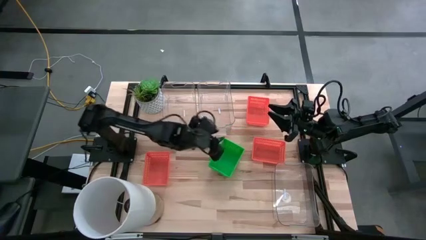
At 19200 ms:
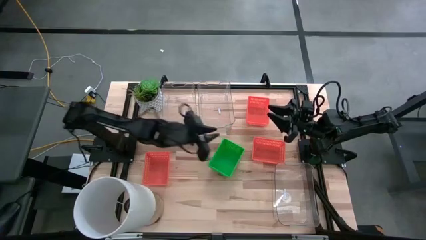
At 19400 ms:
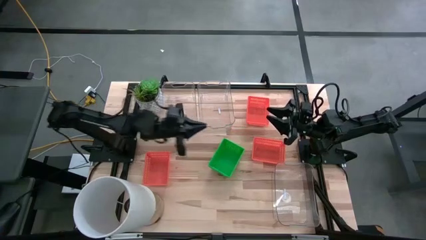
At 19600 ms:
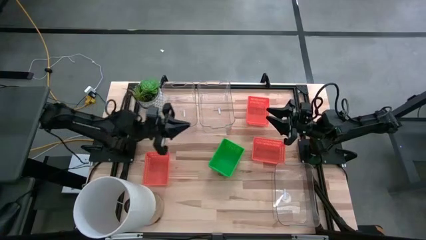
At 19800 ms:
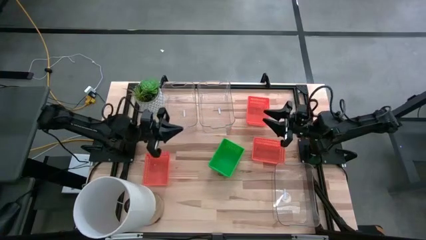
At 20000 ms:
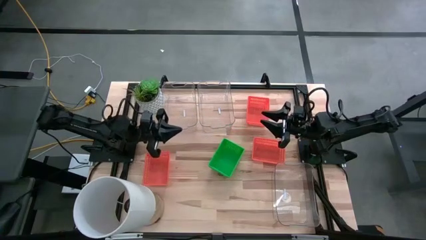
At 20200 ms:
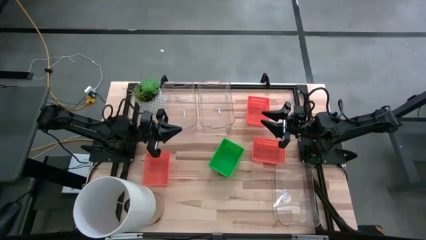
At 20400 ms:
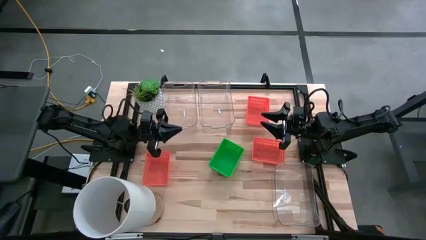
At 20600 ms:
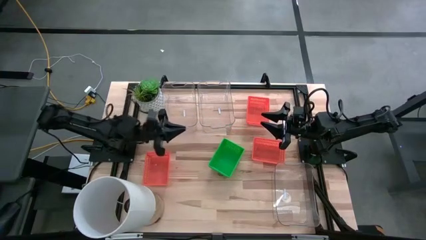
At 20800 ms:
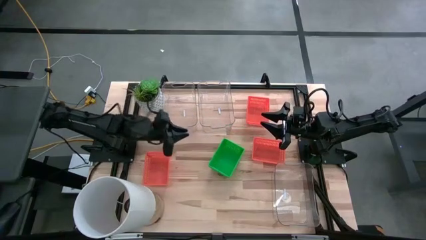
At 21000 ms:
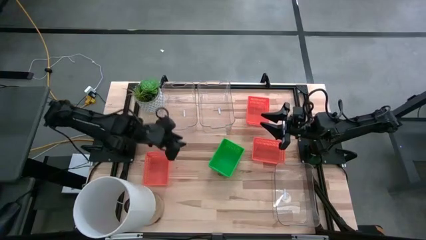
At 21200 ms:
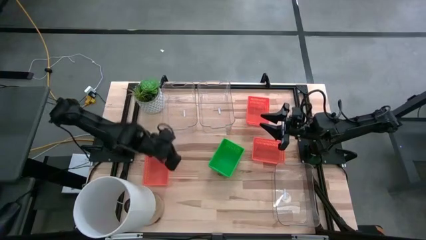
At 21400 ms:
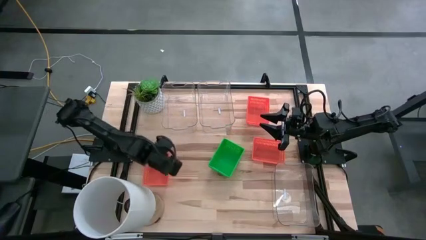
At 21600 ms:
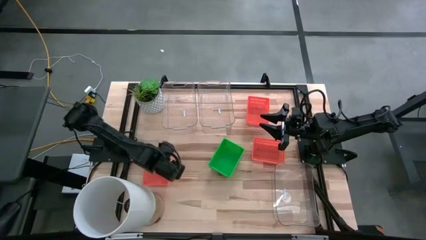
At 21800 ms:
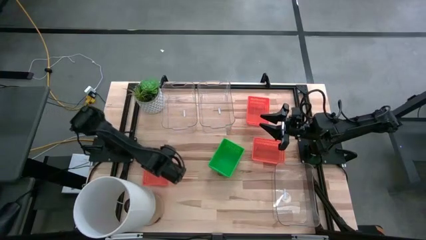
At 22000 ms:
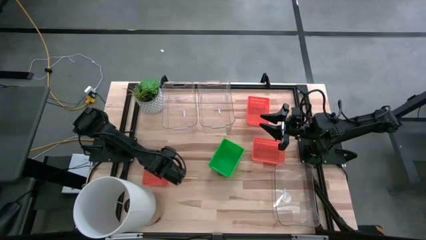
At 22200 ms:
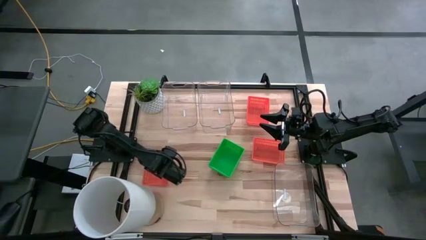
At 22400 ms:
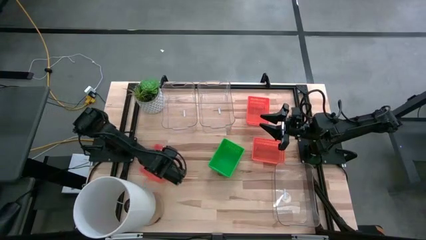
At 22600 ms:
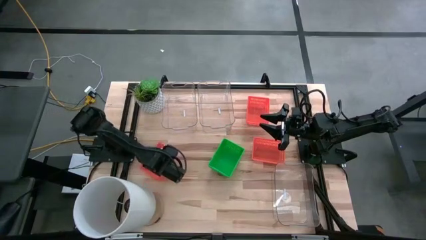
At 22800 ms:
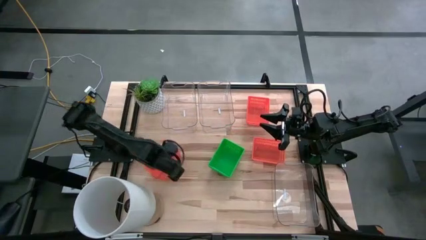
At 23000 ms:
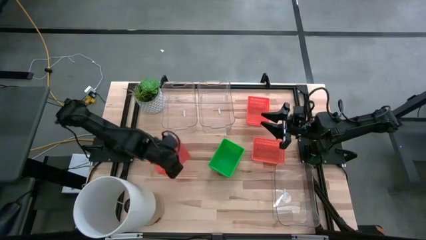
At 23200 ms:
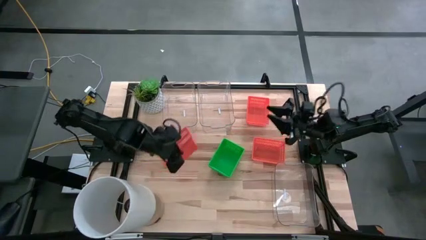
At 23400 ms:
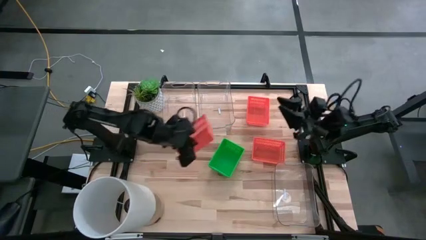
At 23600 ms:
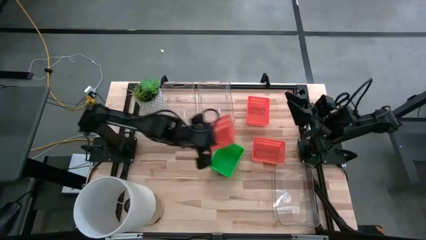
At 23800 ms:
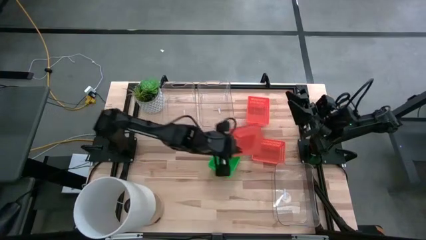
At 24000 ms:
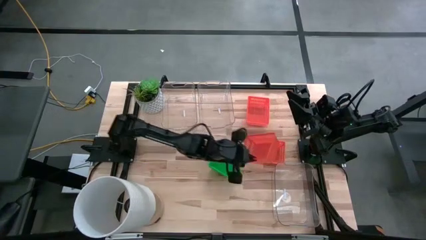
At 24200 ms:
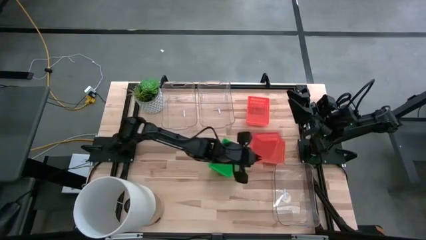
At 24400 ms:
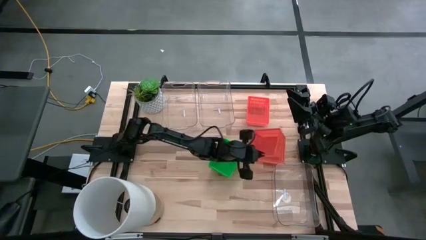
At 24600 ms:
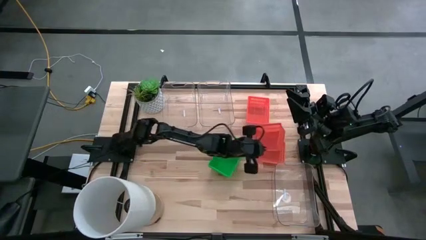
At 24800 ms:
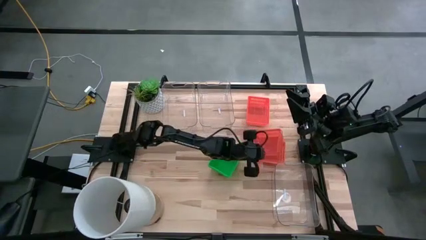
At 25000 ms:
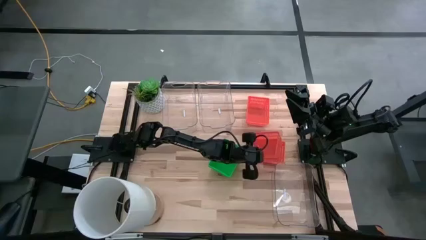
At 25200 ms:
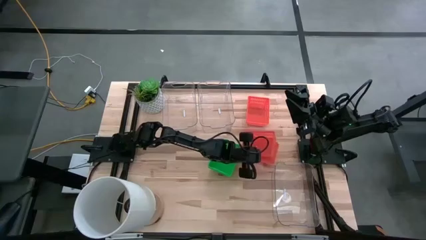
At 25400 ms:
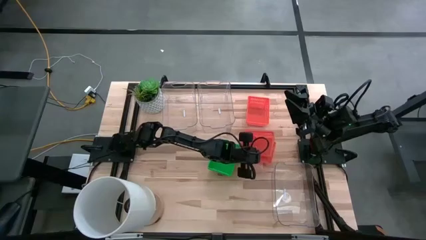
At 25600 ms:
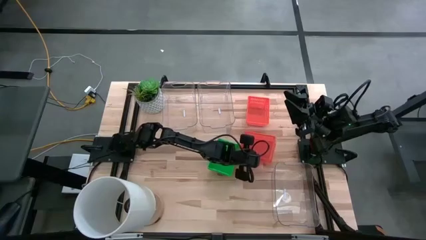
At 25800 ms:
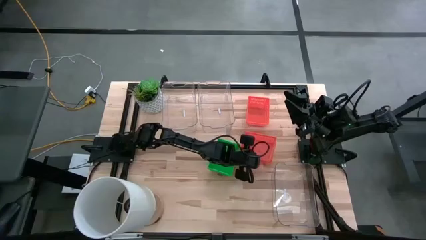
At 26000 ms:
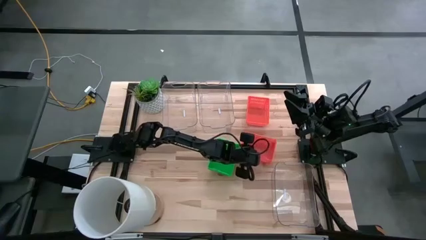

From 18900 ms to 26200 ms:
Stack the bottom left orange bin on the bottom right orange bin

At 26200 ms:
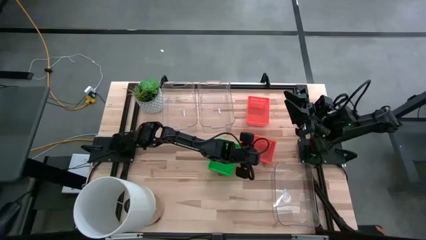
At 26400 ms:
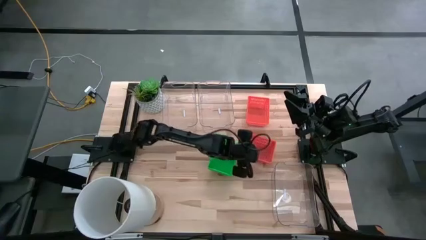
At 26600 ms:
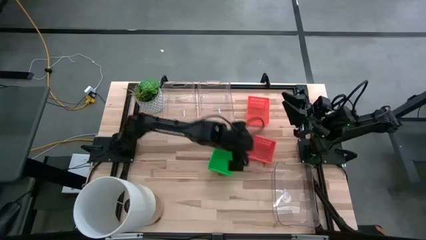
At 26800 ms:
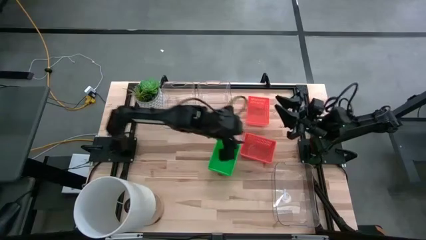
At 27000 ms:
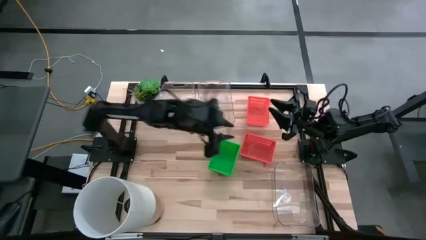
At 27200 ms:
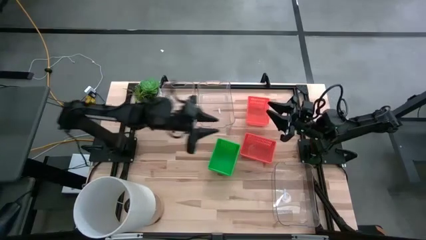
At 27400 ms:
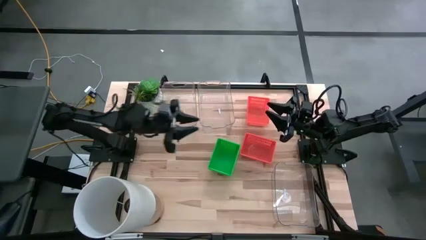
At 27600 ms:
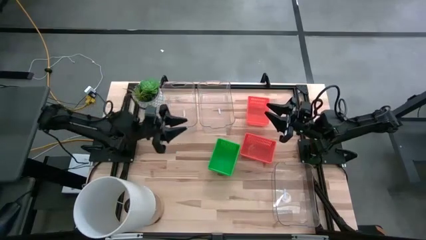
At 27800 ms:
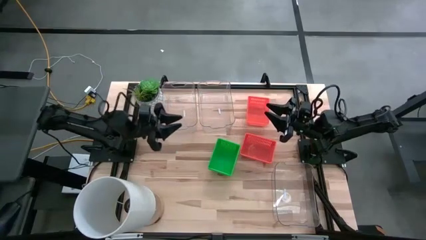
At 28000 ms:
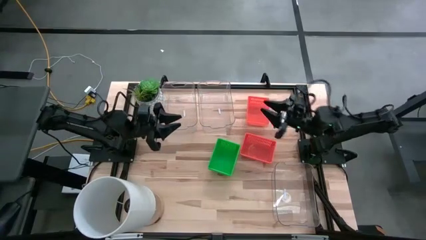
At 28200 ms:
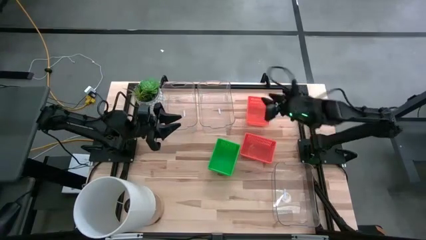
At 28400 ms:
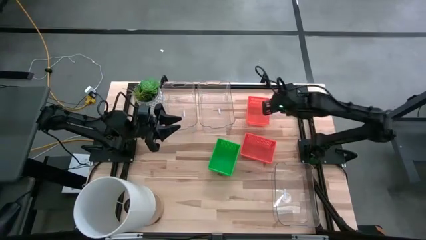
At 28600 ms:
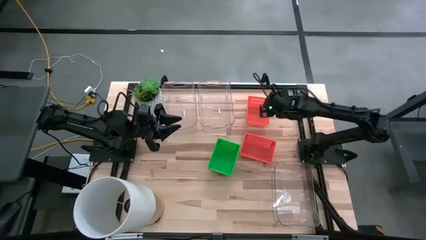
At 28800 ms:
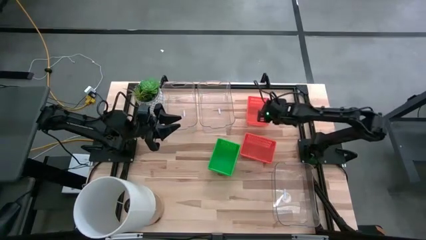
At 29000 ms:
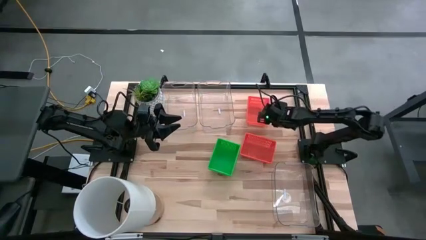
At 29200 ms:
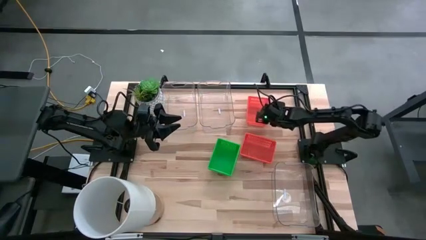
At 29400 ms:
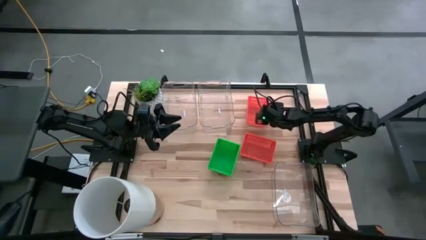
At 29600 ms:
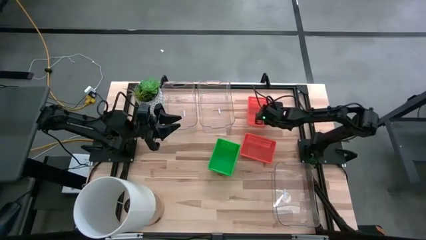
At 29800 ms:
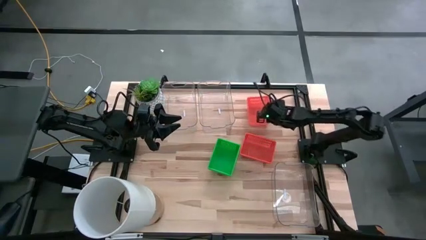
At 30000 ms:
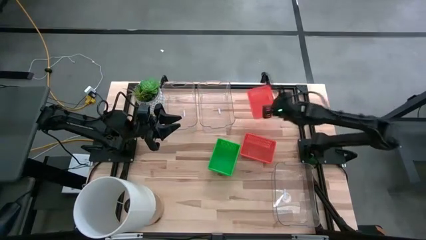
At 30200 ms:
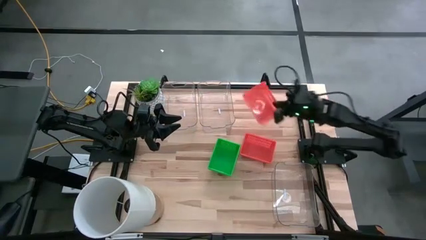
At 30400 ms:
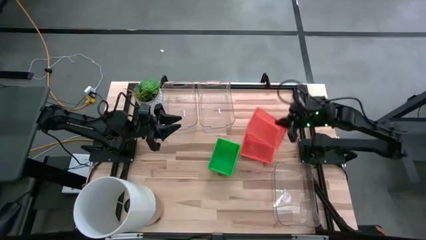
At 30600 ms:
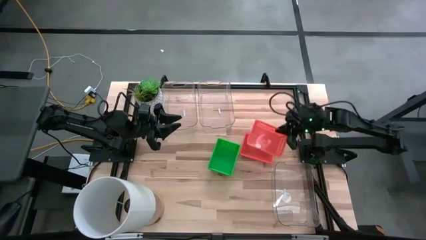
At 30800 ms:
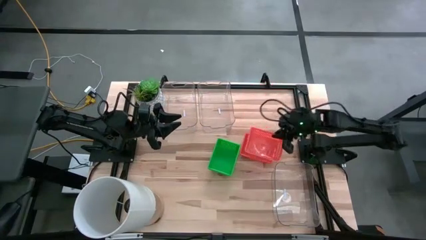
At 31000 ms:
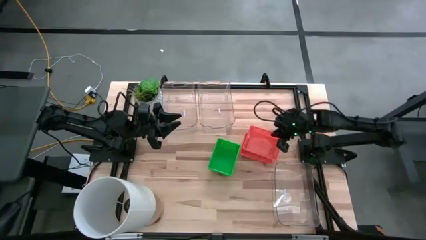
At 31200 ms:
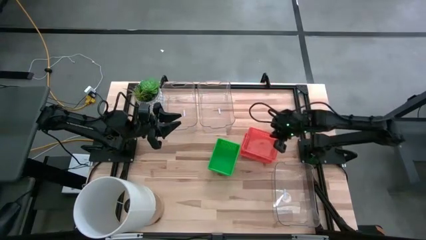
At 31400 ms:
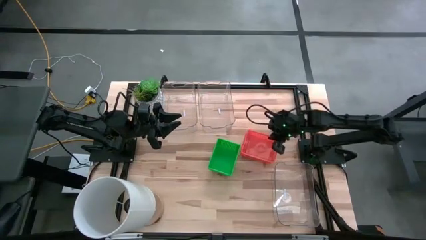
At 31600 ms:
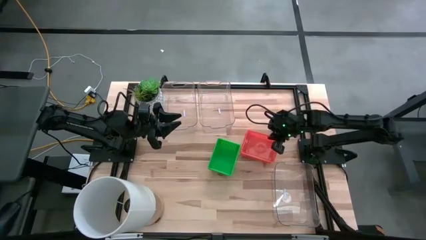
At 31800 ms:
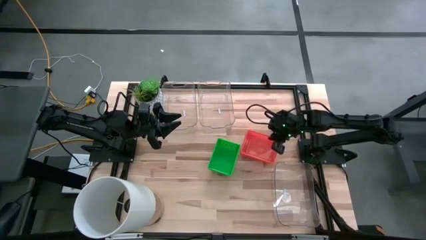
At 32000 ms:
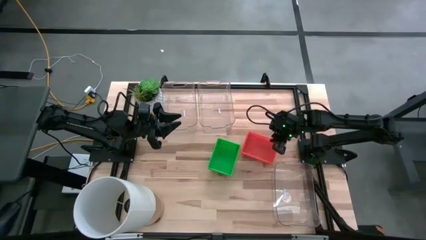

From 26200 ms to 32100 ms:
Stack the top orange bin on the bottom orange bin

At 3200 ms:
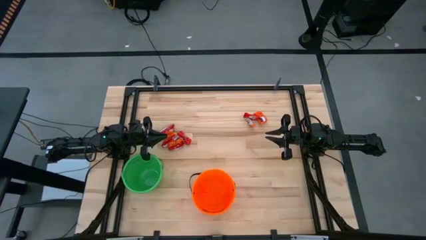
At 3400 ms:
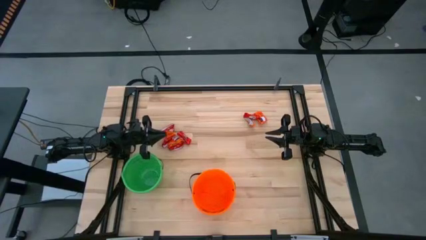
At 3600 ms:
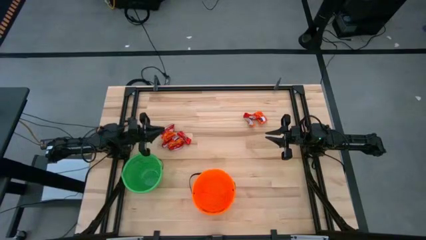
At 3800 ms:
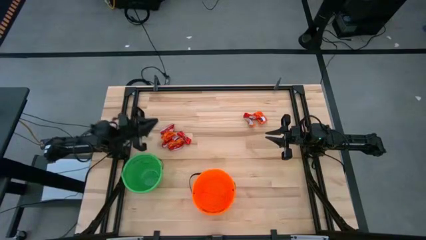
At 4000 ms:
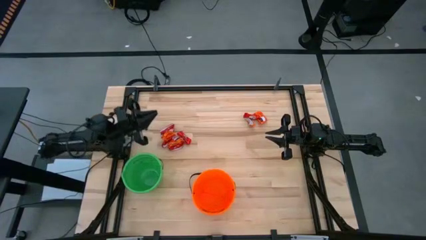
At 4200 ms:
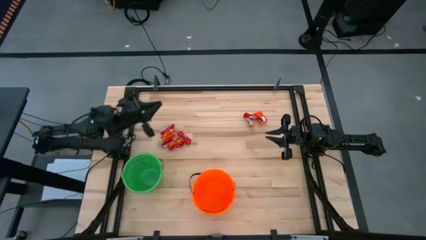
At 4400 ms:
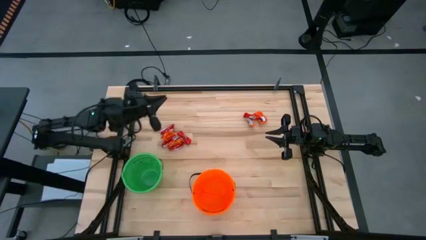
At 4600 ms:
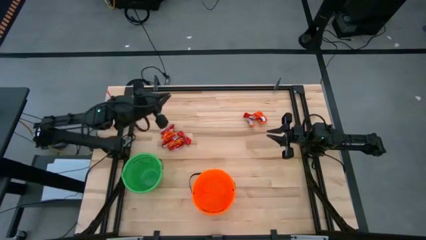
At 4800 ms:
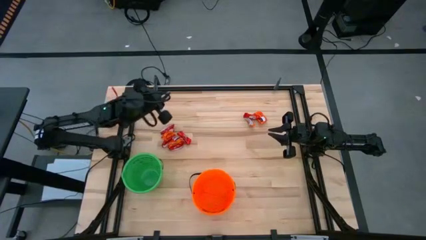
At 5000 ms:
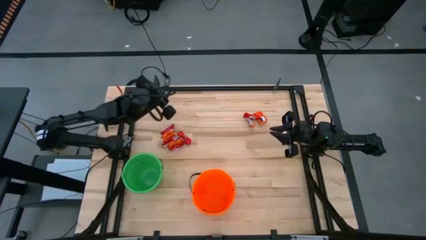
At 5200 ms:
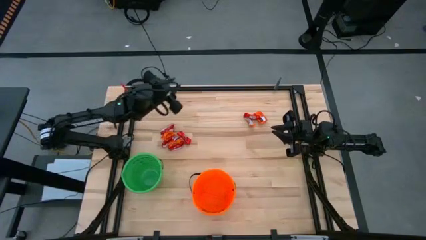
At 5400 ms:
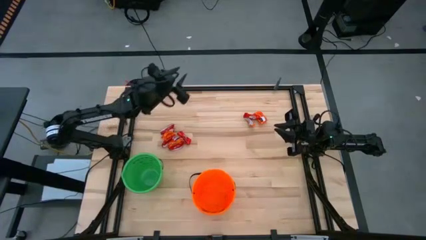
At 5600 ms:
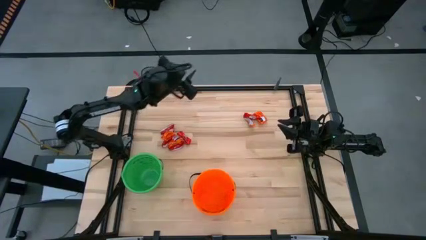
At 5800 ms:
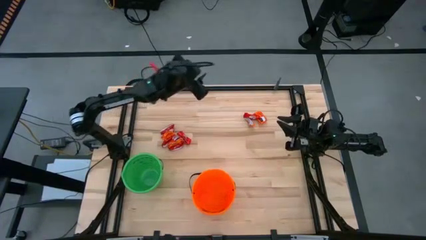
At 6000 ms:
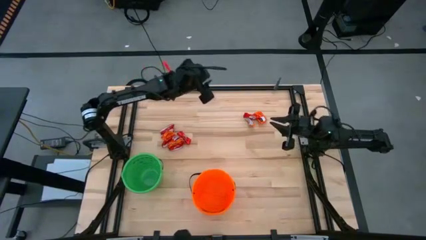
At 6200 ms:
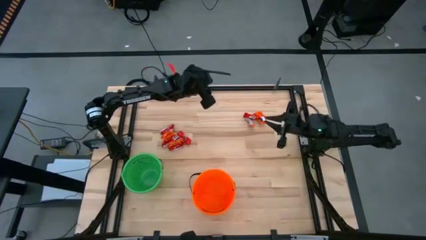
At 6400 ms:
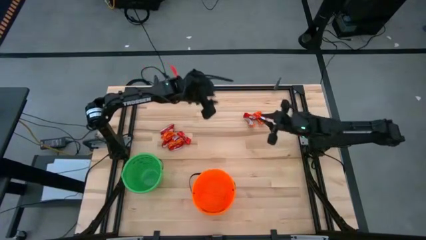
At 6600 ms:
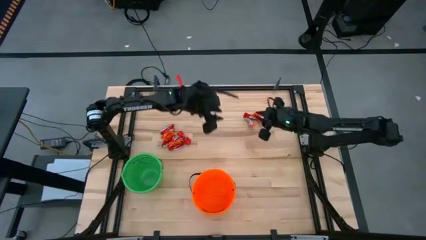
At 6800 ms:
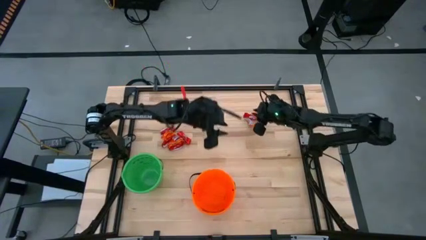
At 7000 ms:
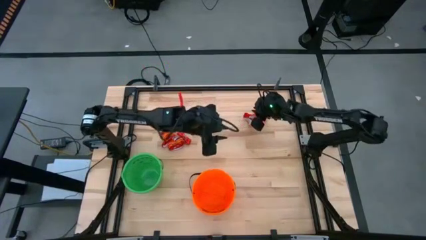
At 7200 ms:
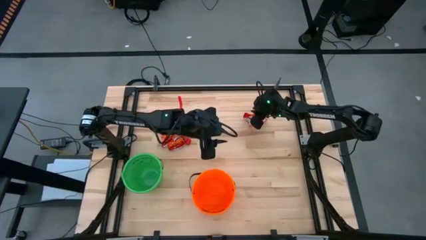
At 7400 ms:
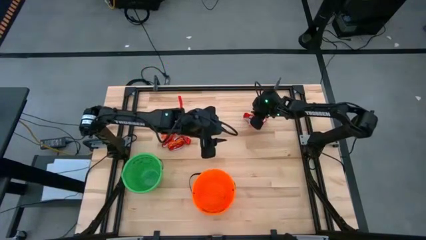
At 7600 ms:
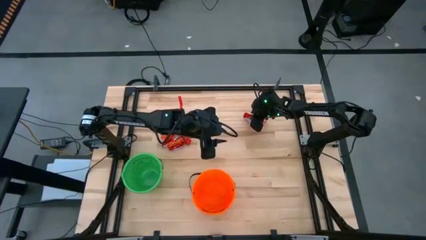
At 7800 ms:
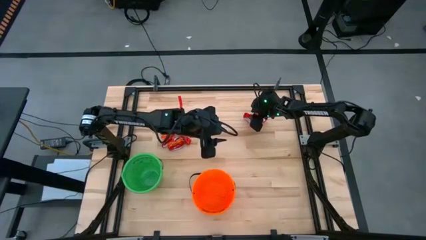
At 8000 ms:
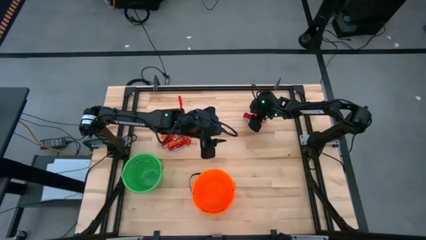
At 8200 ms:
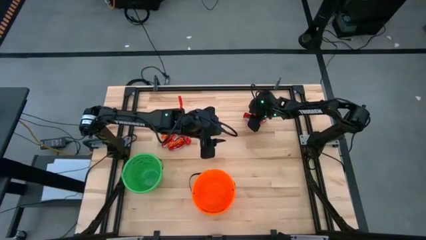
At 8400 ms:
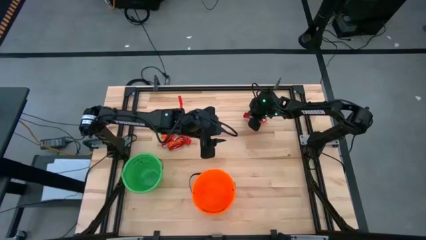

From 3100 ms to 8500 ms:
Put the red chocolate into the green bucket
